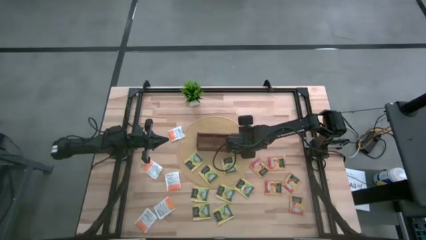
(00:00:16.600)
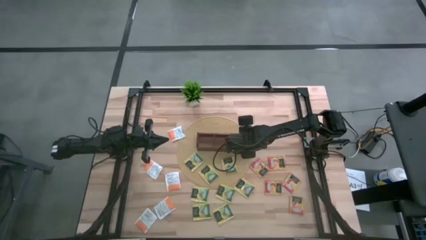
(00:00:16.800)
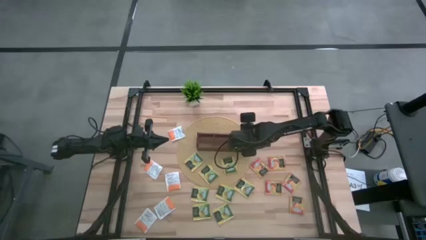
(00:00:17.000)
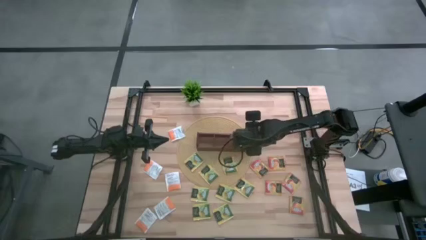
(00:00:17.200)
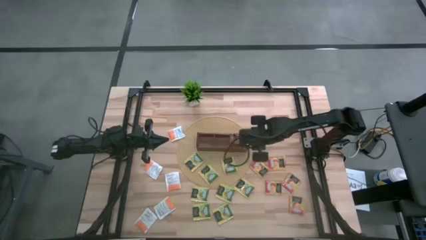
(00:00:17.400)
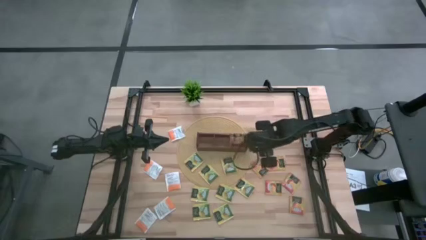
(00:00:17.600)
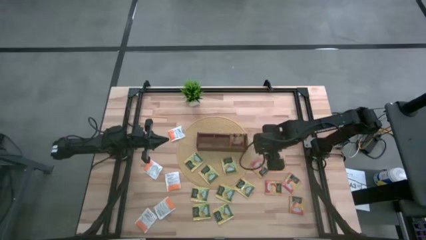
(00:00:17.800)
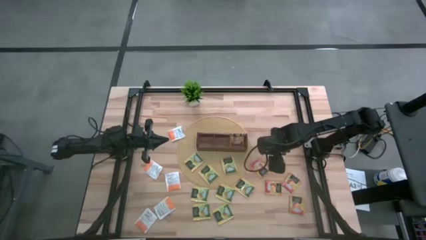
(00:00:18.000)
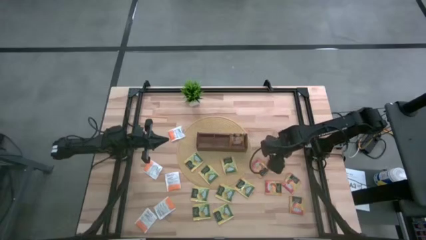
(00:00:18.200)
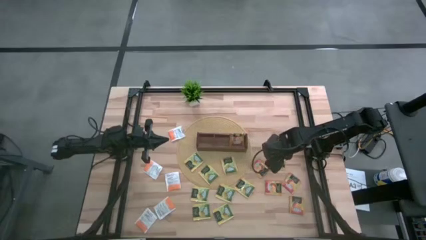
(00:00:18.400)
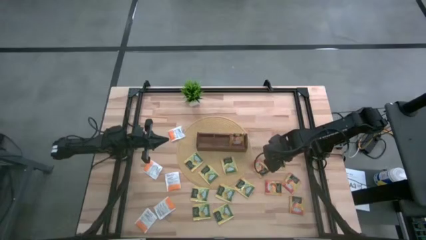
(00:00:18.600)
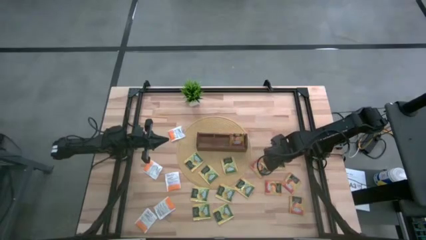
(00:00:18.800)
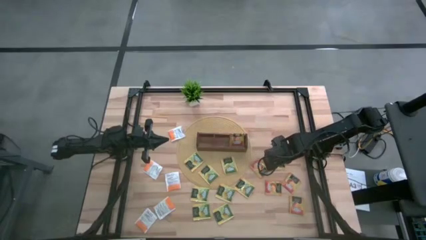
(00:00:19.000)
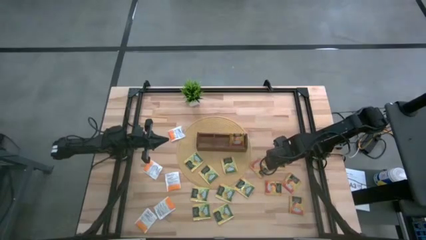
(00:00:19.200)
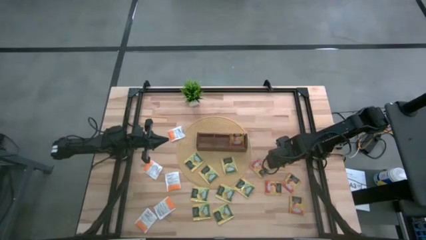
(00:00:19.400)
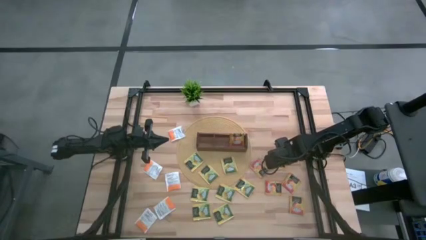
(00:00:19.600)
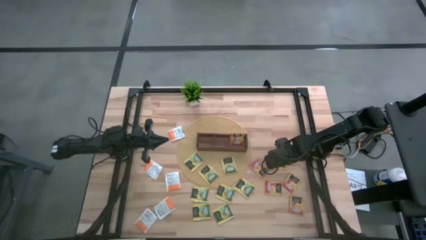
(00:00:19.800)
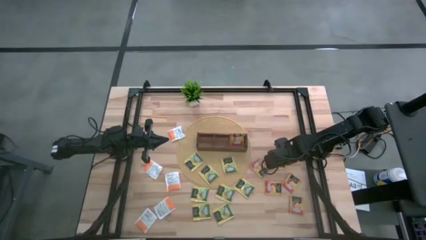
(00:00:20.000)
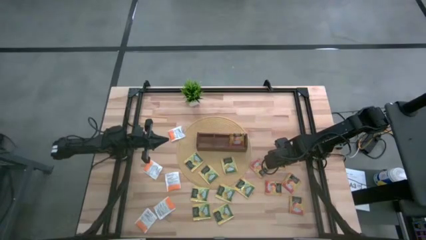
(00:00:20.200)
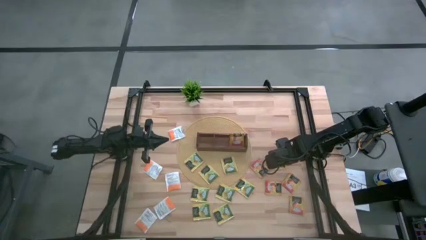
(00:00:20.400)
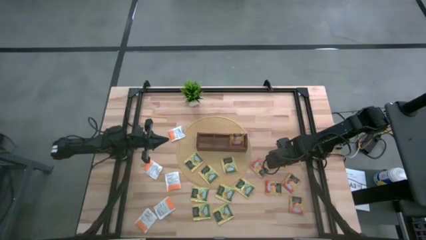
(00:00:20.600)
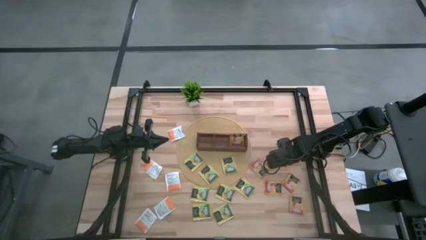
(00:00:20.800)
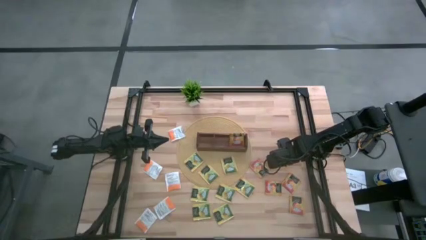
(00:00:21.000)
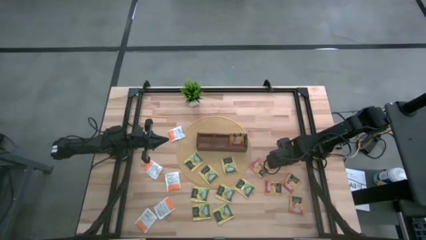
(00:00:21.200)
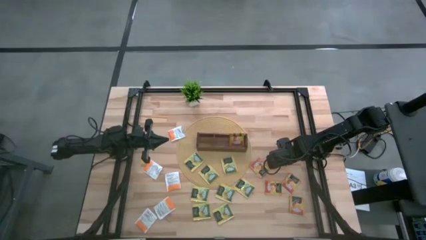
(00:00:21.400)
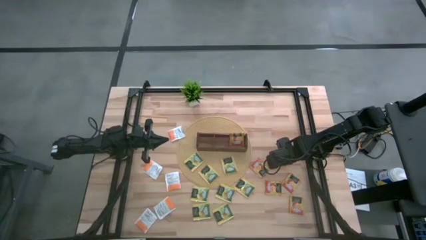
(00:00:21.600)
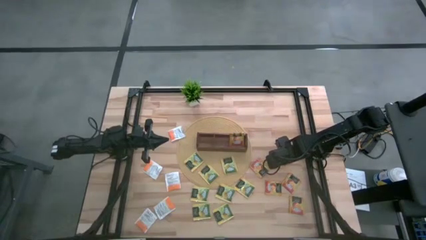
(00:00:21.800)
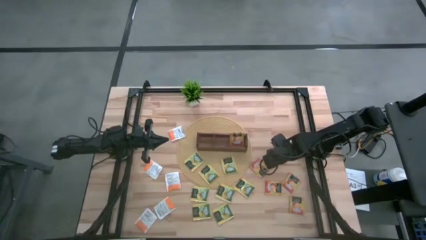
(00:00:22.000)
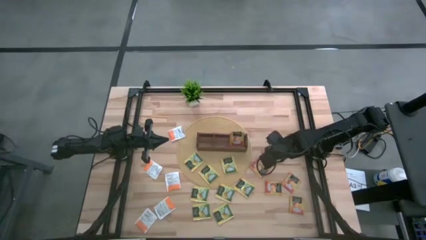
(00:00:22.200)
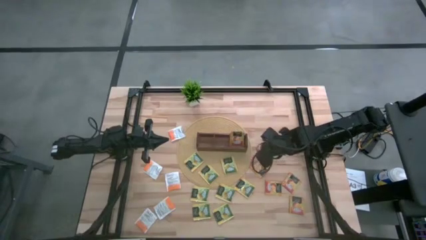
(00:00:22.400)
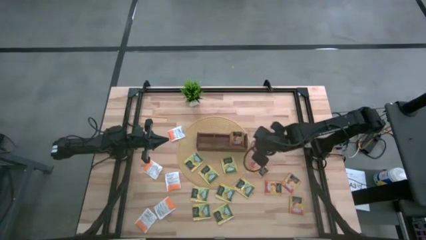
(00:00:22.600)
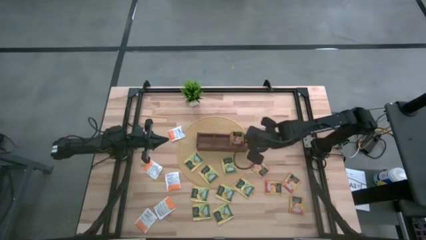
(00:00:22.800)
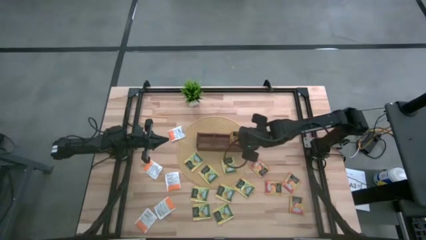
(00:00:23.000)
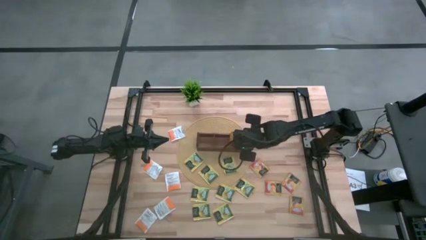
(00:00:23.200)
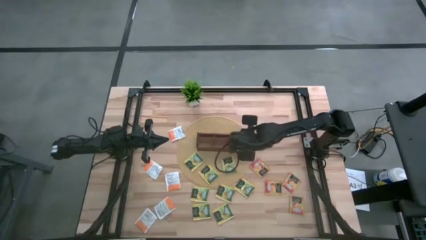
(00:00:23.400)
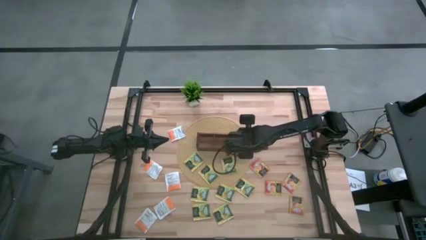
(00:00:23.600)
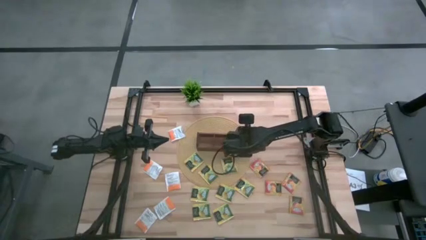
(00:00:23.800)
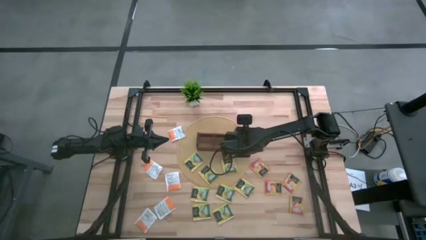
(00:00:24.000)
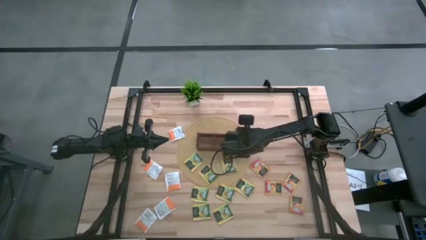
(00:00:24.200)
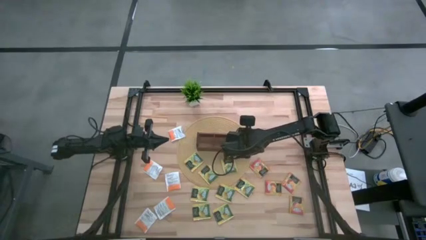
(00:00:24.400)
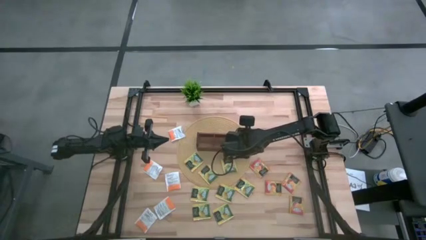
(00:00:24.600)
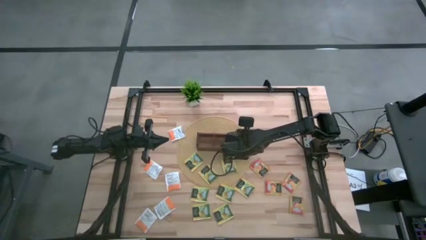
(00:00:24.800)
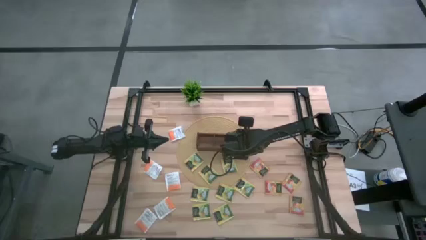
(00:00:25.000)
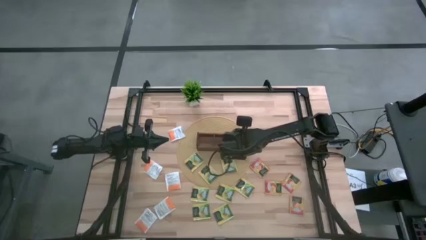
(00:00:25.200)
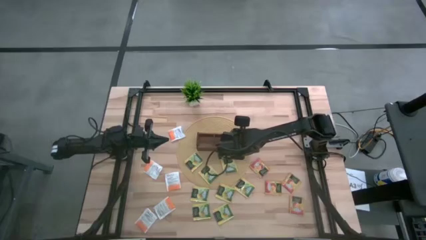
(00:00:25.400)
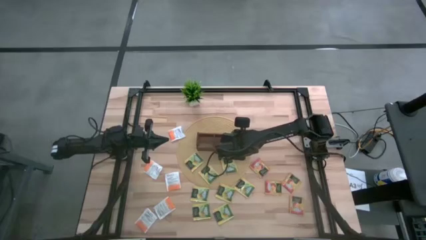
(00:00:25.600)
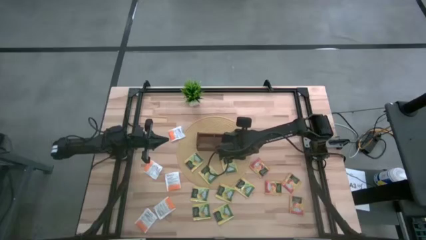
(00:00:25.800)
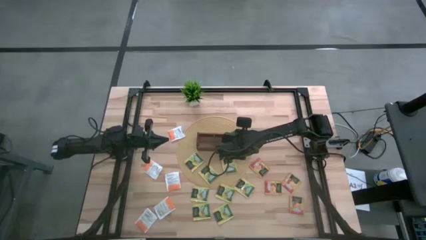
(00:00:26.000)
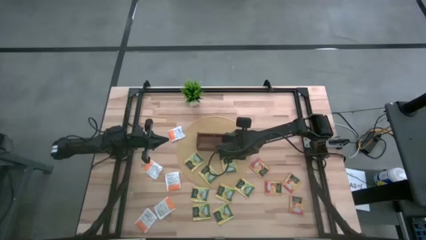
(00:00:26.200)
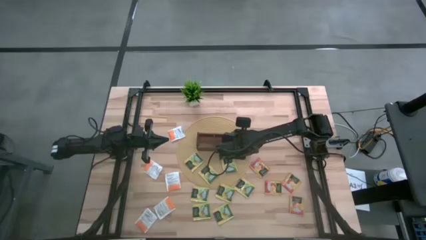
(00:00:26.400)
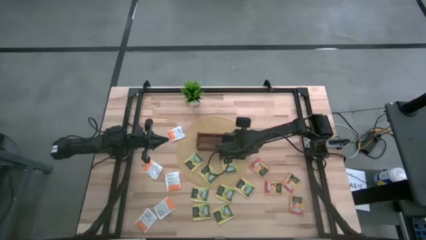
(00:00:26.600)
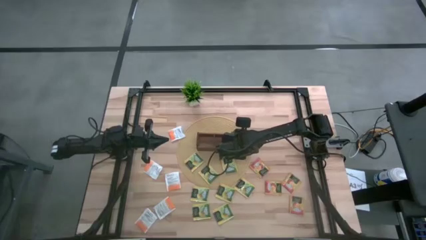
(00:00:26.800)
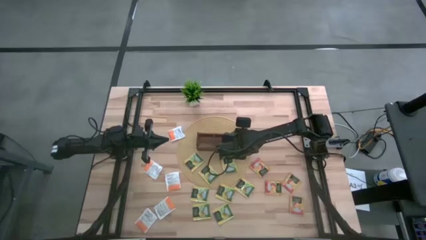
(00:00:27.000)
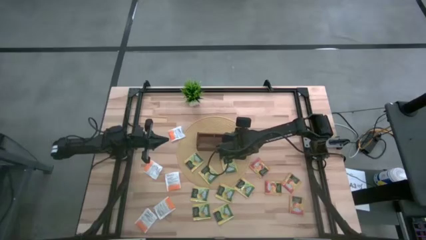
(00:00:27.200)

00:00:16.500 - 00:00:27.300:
Task: Pick & Place Tea
Put the orange tea bag into the right section of the wooden organizer
